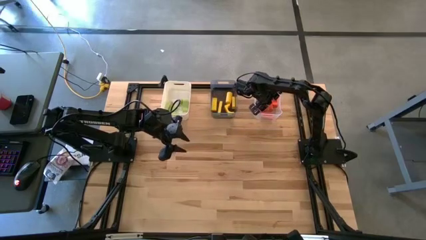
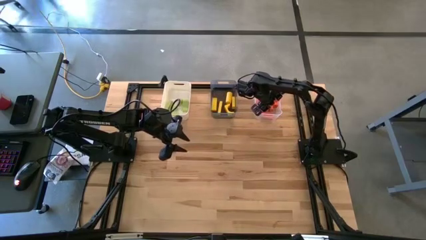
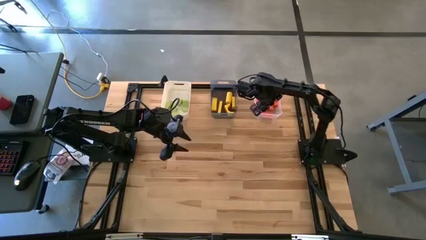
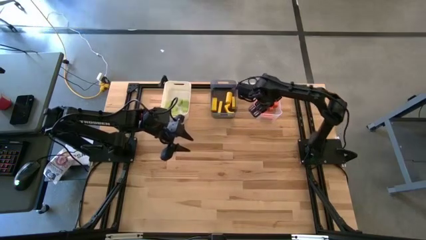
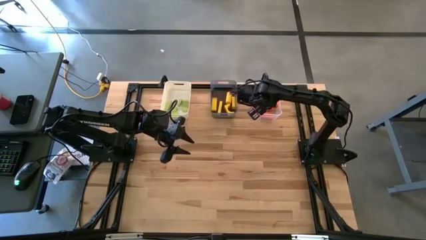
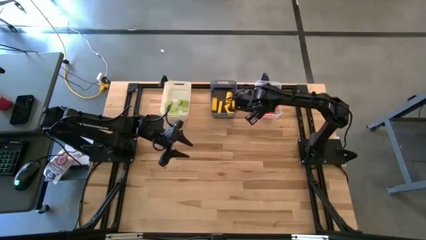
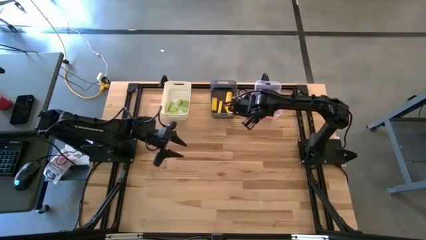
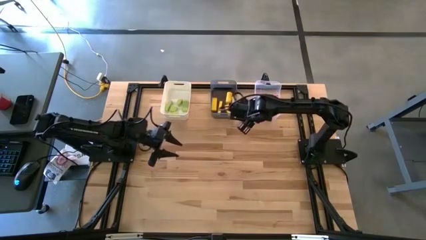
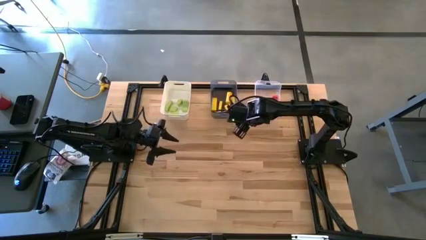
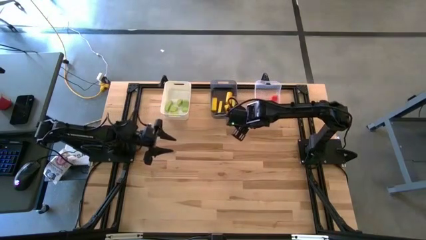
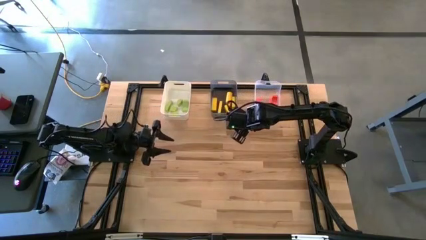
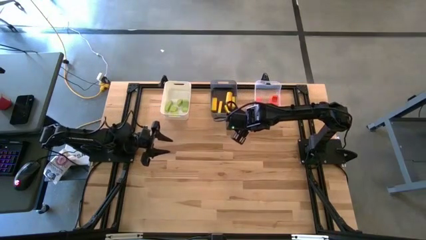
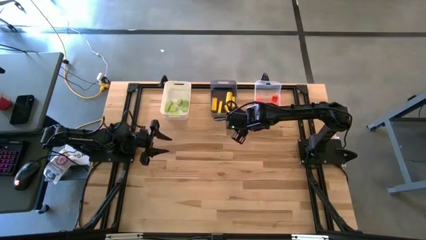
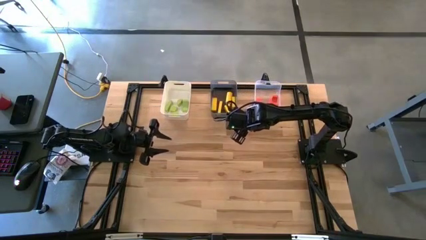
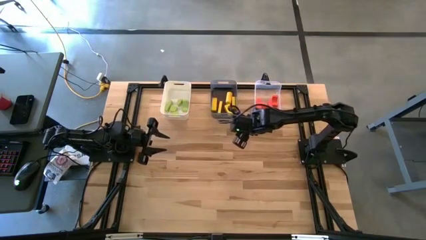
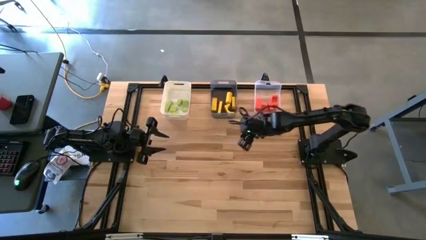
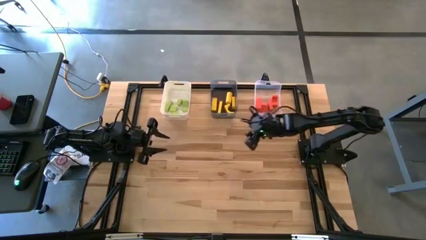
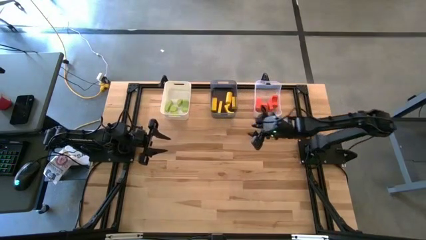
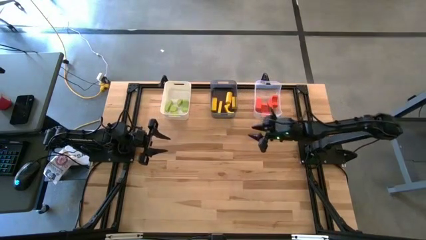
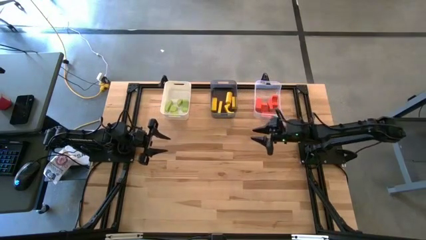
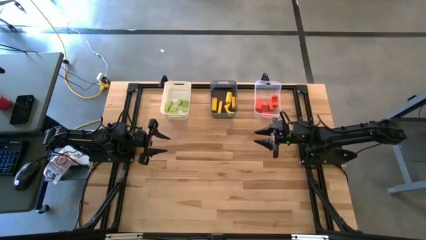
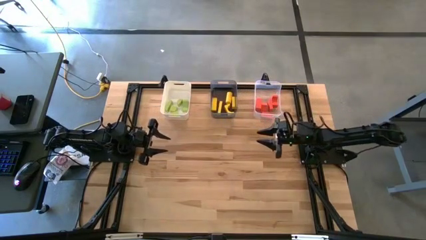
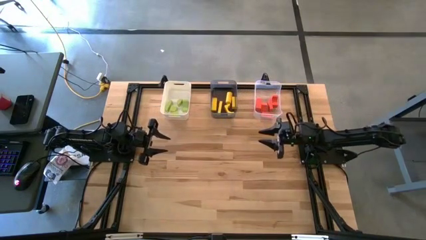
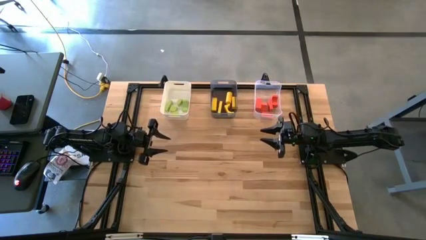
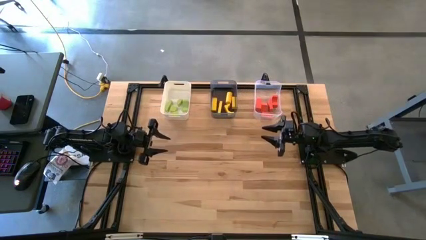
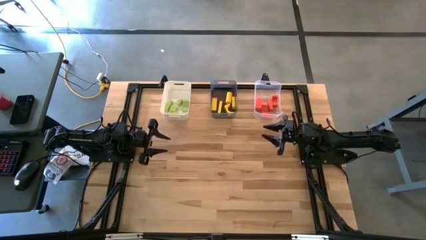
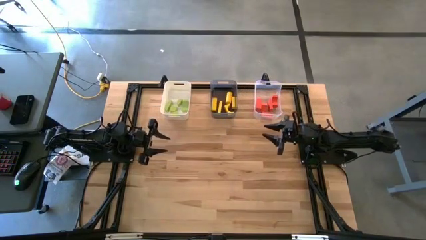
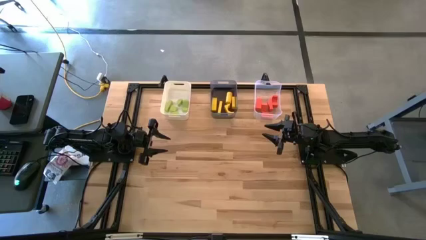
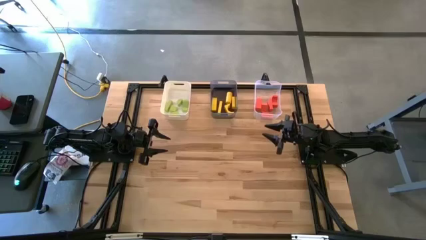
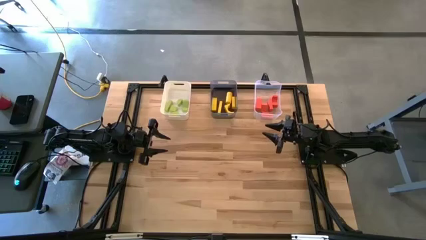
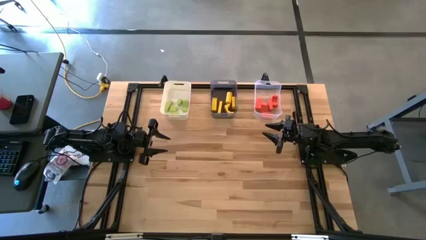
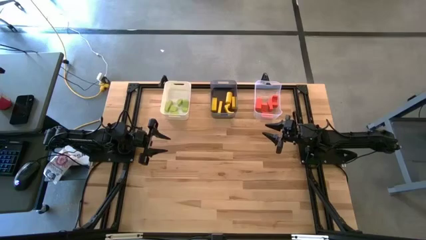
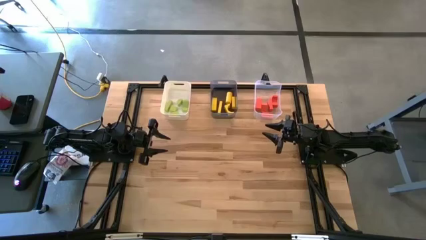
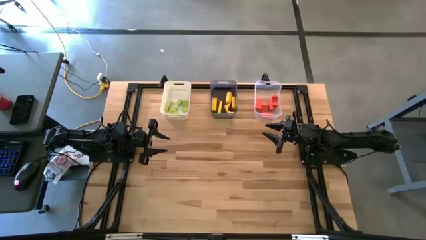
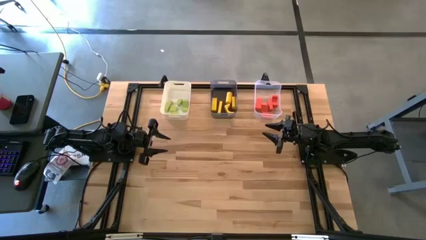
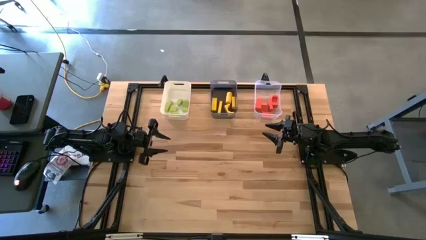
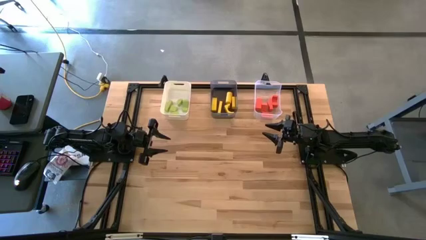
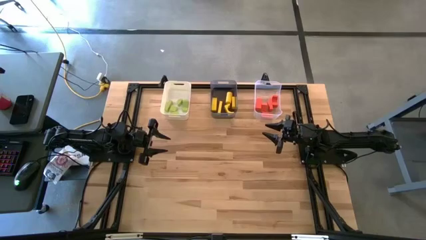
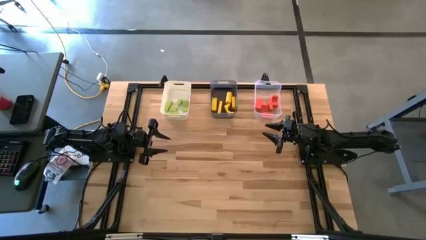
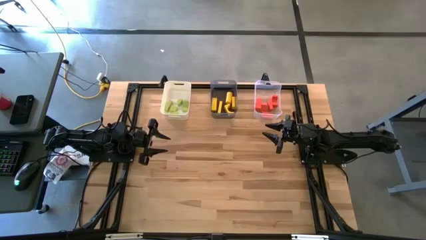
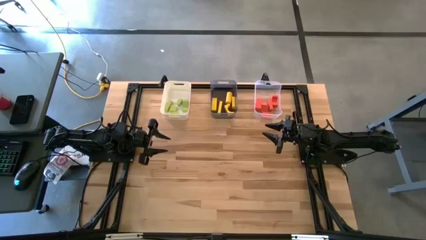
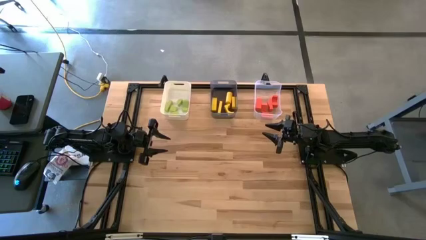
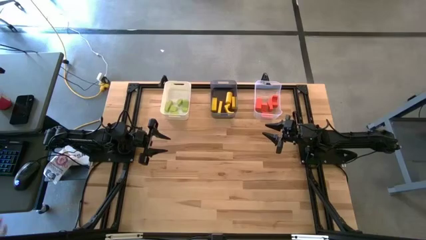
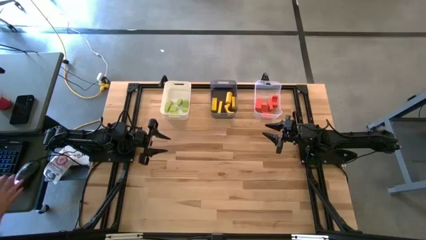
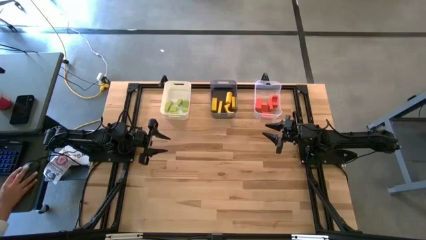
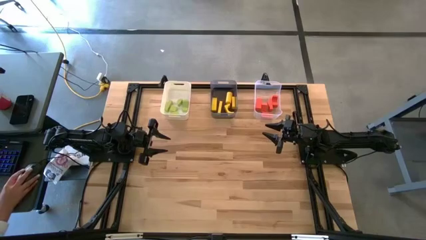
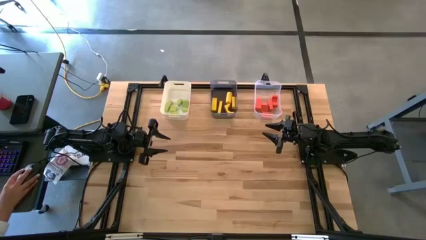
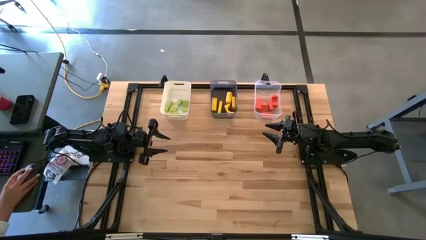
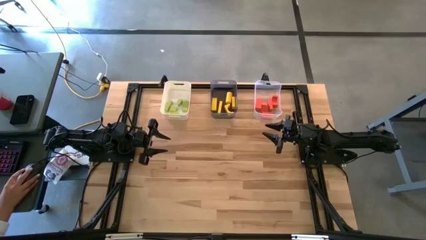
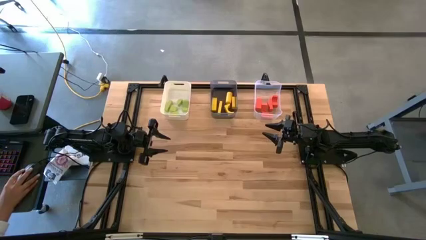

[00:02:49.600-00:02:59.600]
Task: Sort & place blocks by color
Return to Home Position

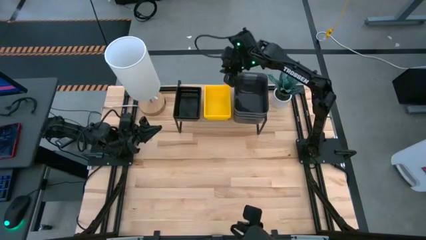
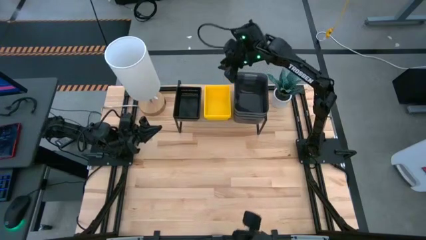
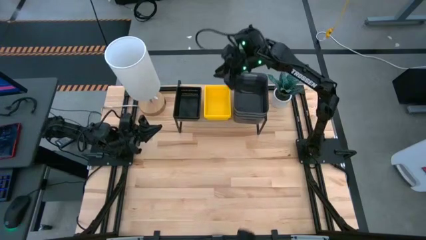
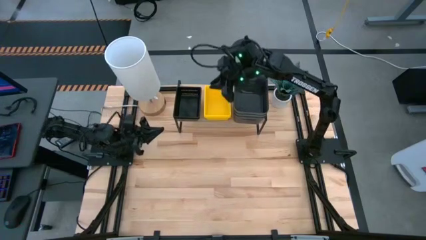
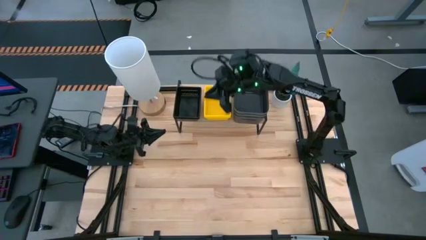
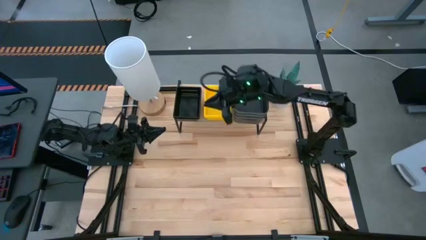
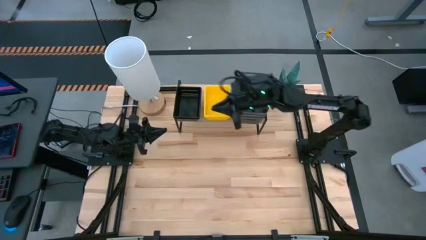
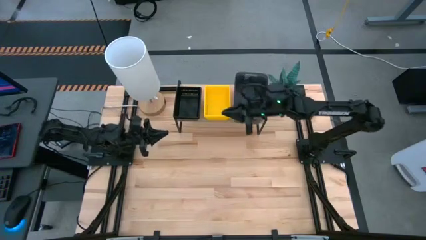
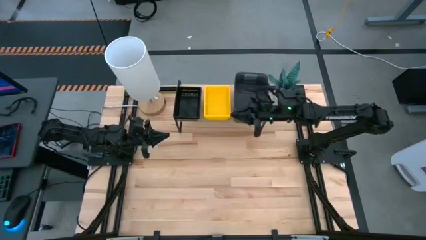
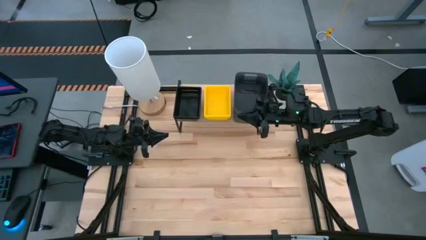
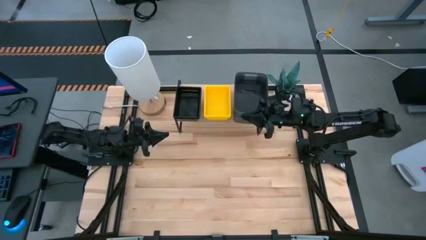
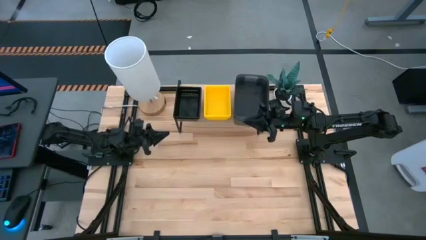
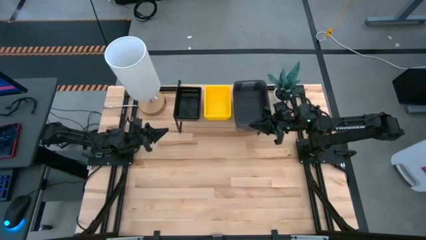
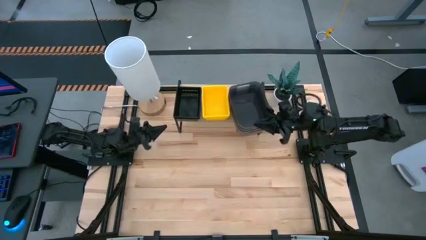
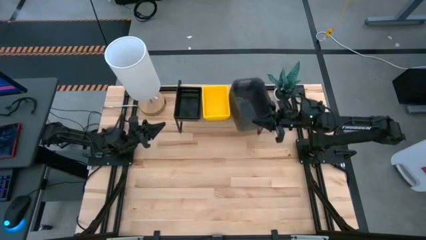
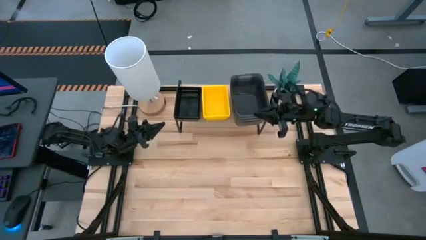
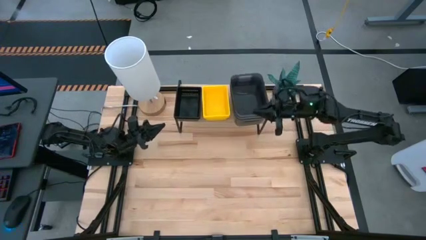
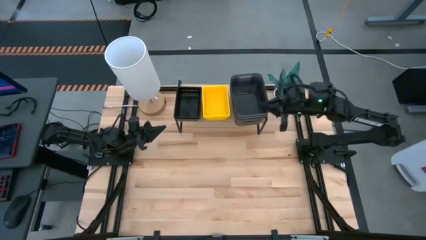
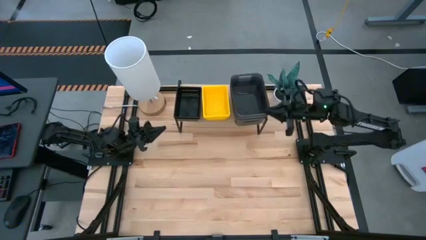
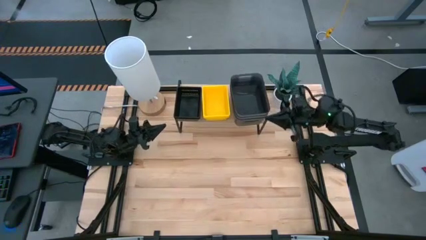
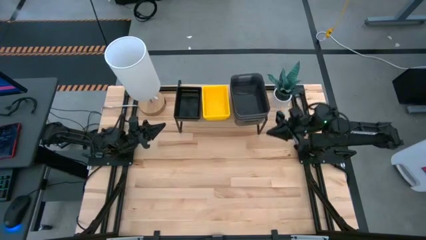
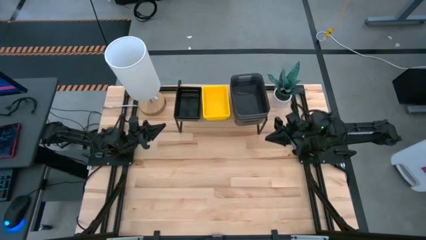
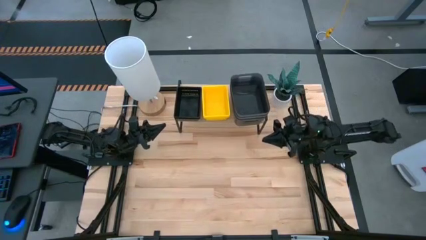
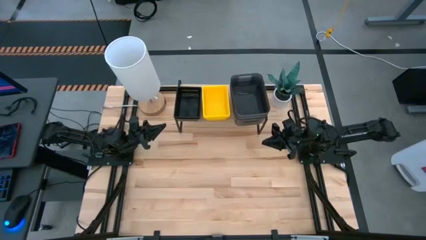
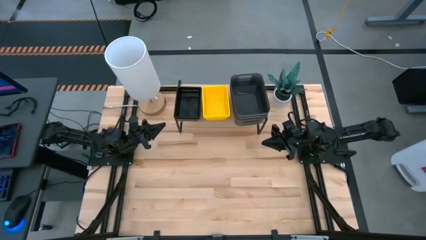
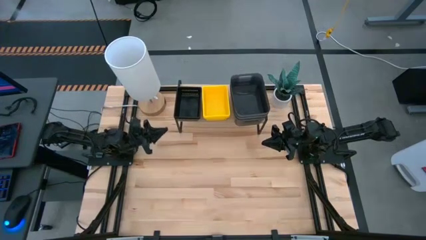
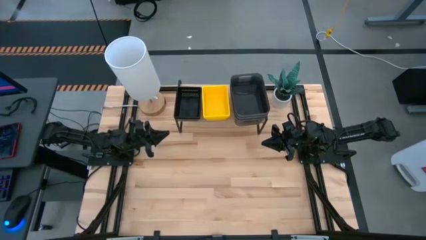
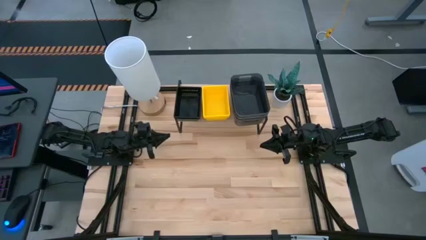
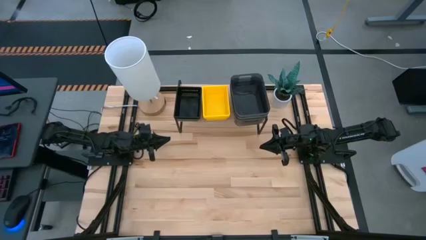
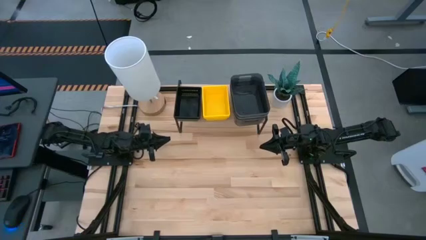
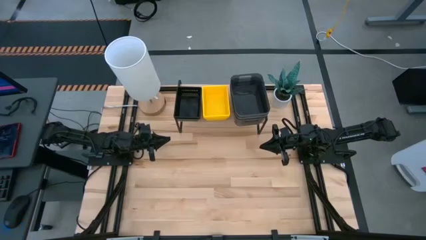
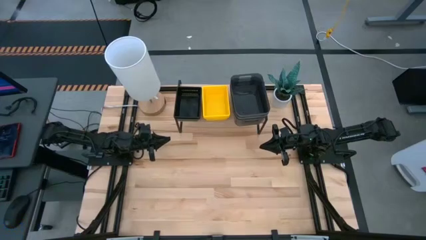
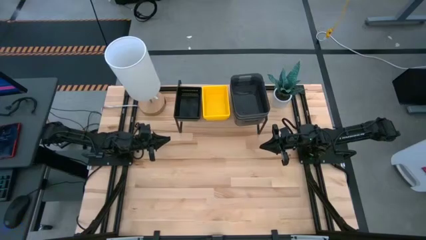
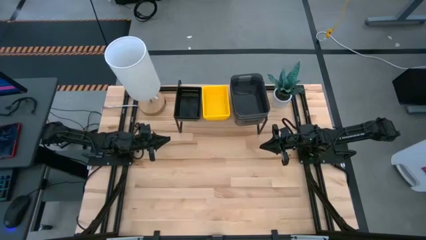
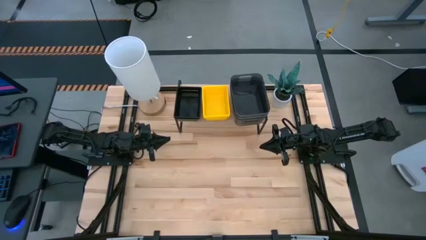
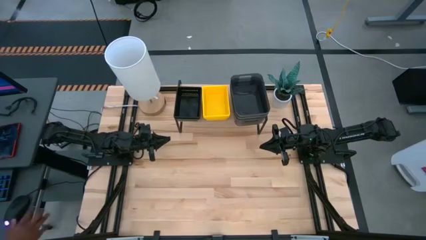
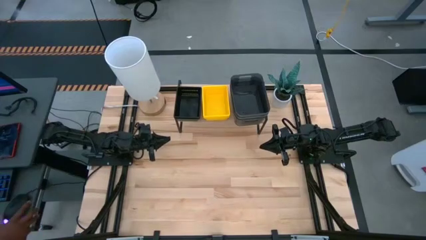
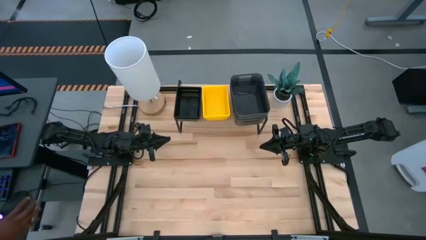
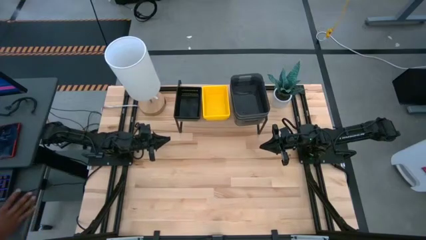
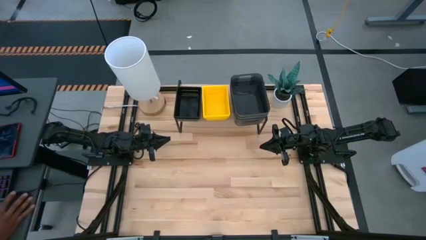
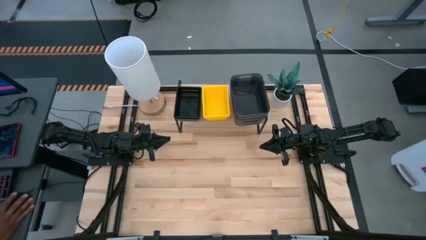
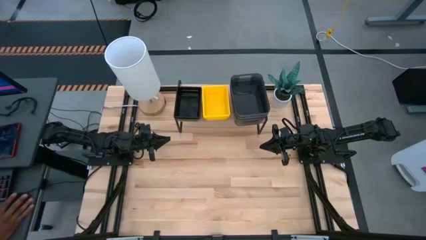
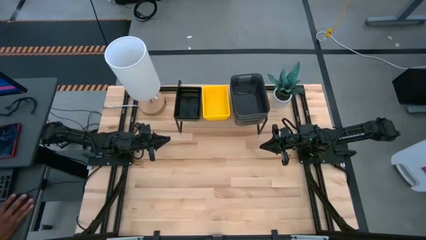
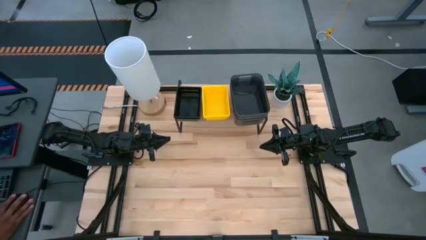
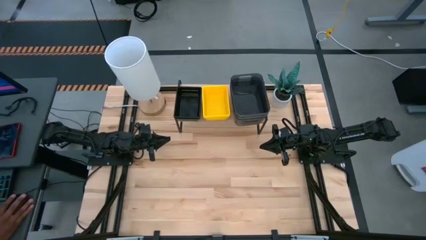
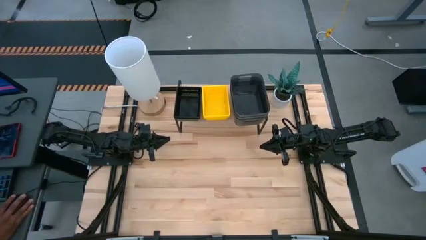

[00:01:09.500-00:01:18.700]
Task: Stack baskets on shelf by color
Return to Home Position
